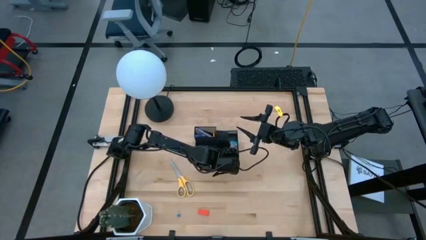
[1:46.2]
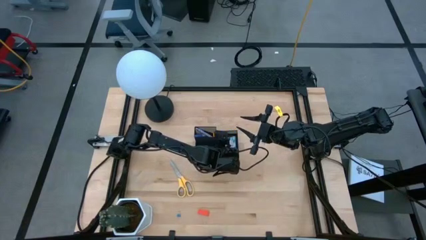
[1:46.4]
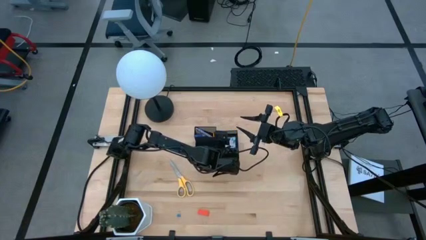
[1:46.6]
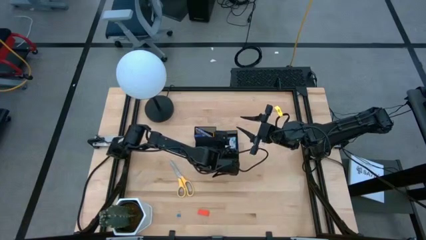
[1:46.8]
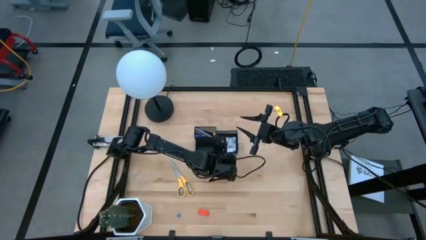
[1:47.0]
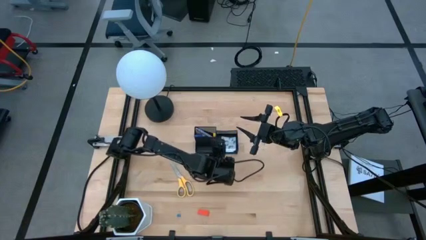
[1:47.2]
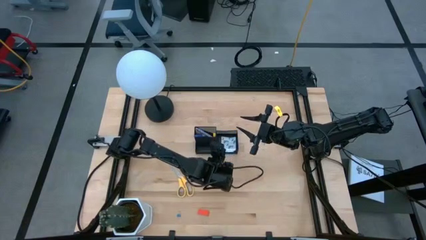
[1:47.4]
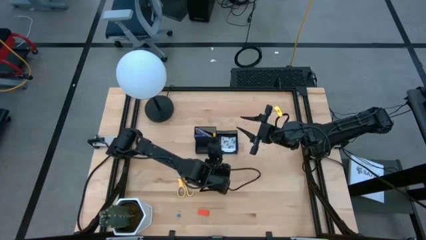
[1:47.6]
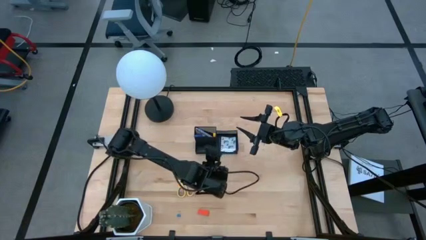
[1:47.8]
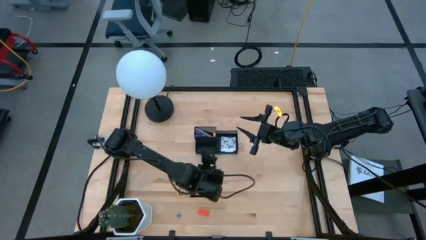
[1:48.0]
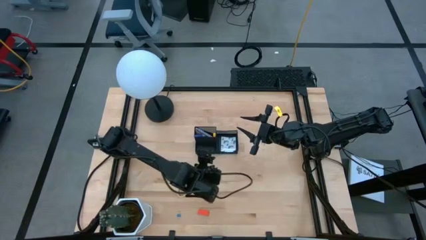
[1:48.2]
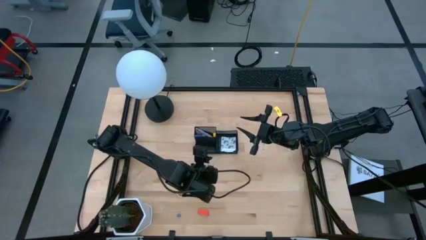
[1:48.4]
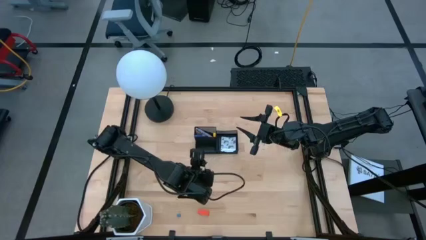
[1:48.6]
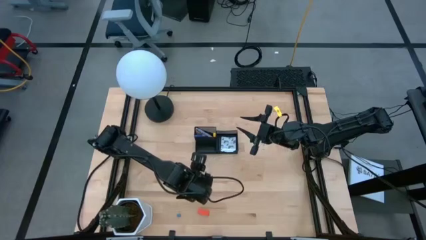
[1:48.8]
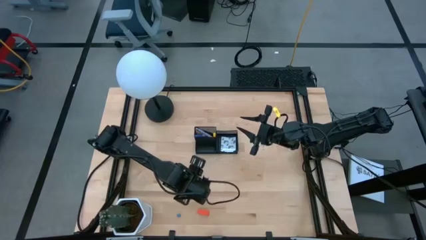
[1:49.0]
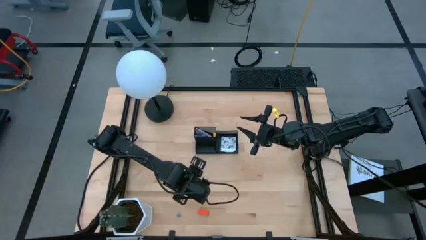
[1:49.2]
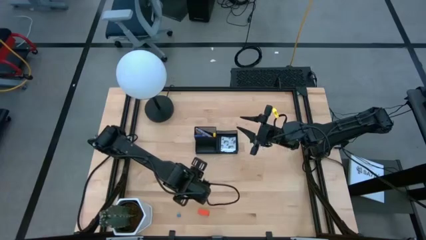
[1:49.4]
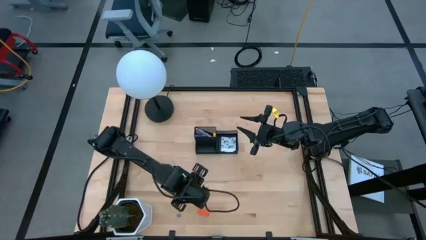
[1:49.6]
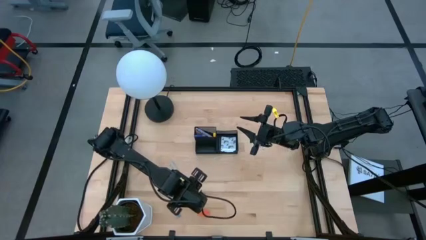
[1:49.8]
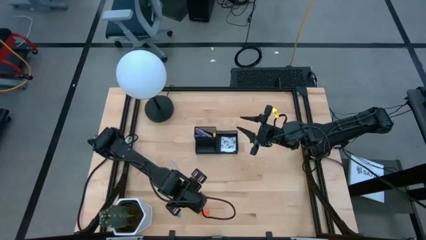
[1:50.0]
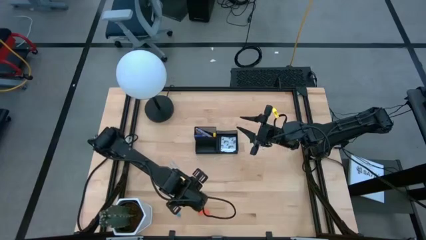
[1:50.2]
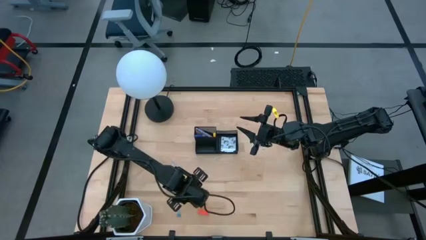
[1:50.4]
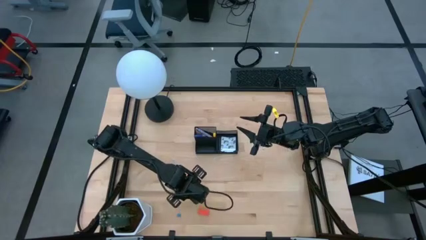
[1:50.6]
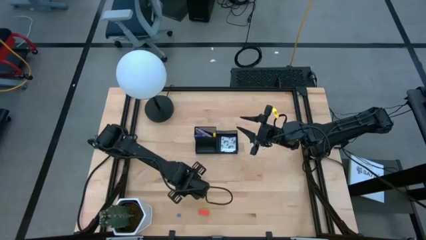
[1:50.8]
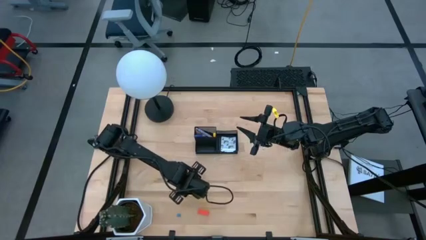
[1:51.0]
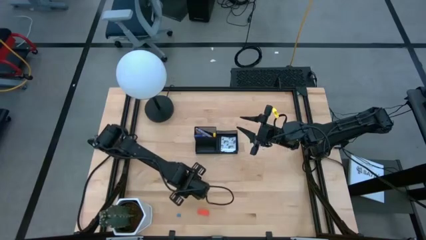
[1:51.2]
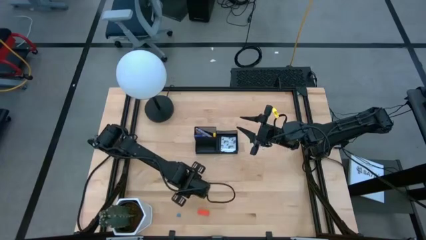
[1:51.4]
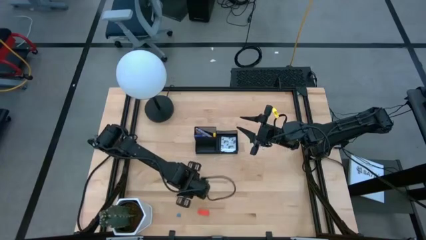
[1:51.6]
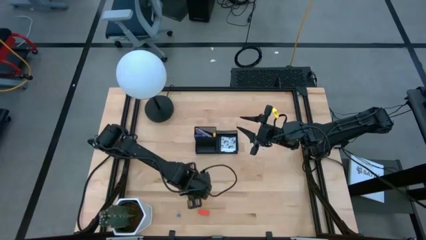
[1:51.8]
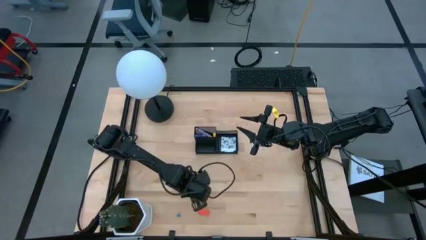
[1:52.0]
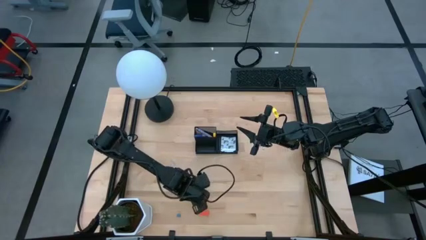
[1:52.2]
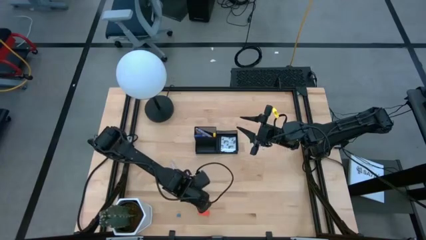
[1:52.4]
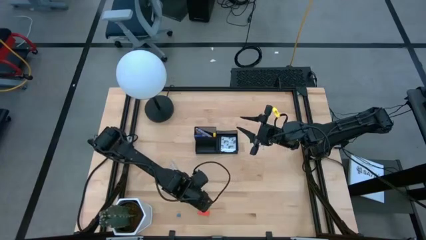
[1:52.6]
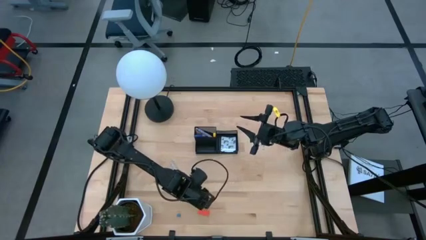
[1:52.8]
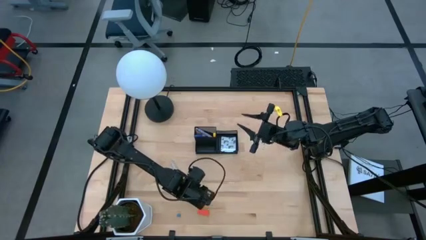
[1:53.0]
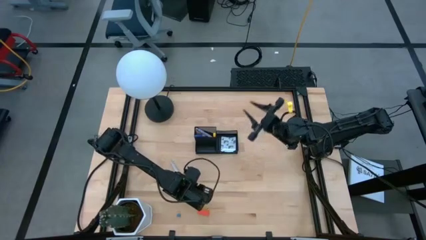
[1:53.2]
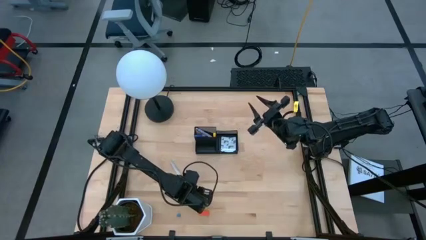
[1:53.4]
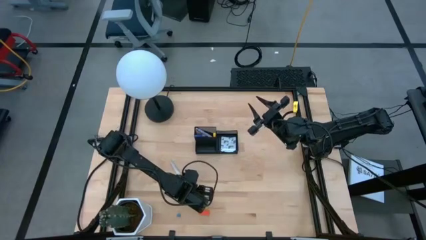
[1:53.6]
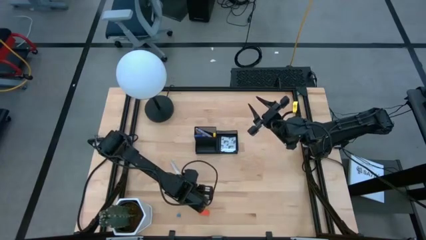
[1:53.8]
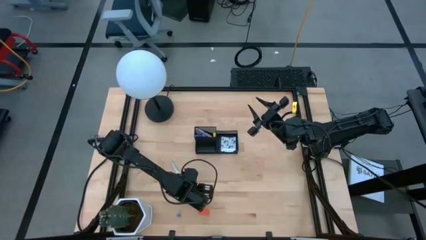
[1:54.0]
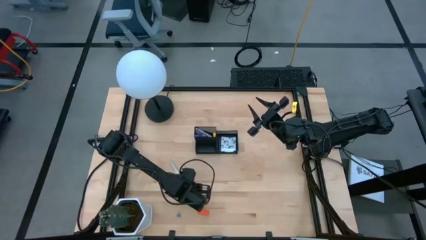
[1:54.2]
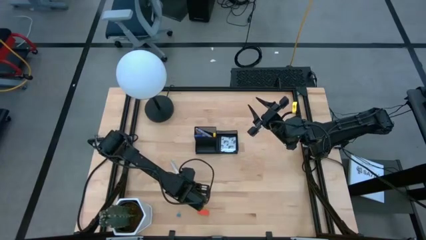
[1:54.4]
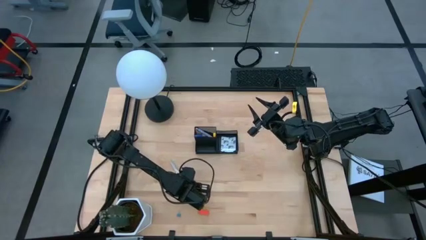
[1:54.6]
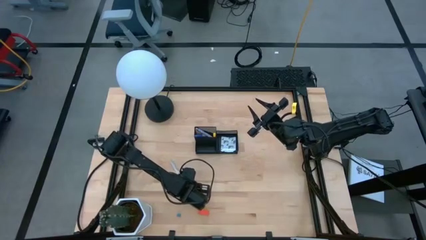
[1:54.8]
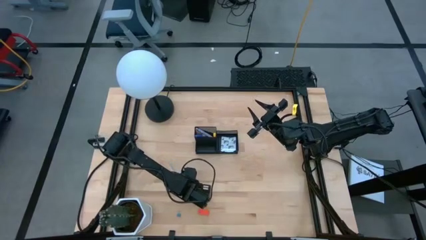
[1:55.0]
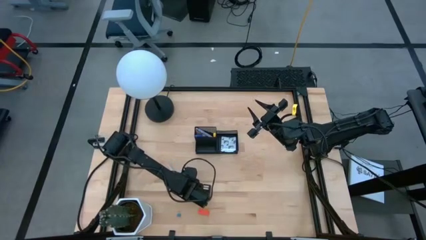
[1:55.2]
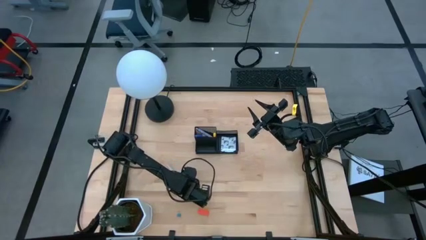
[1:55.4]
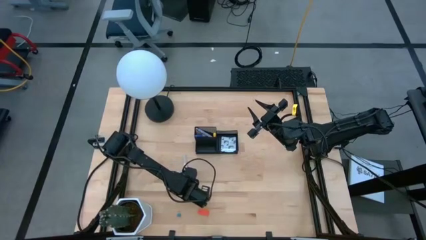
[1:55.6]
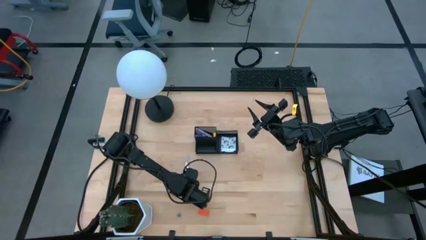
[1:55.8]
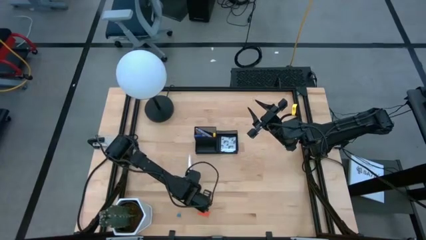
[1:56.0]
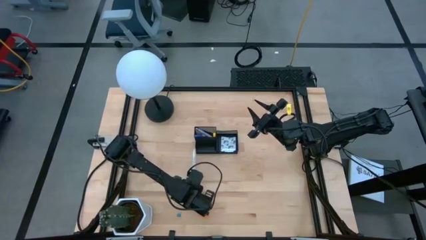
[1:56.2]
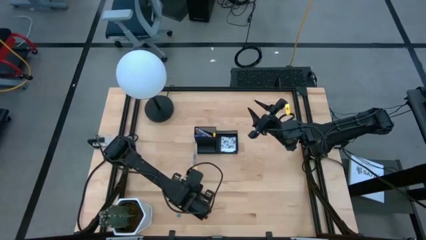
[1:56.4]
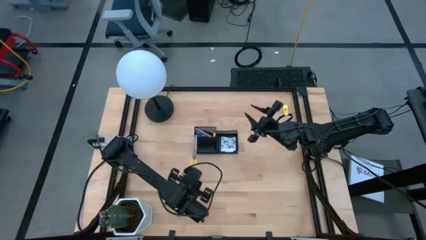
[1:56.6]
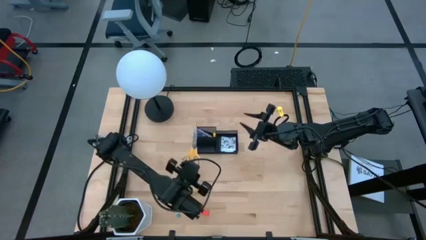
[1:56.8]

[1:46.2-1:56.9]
Task: Pick and place office supplies into organizer
Put the yellow scissors into the desk organizer

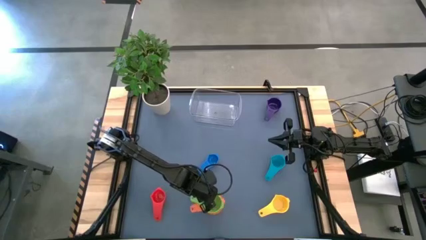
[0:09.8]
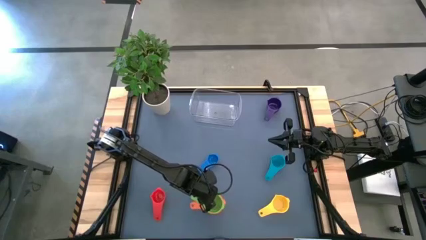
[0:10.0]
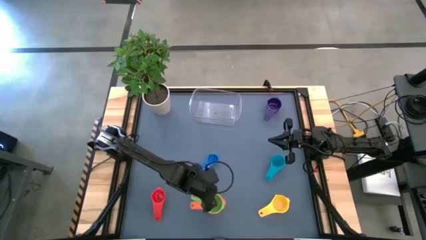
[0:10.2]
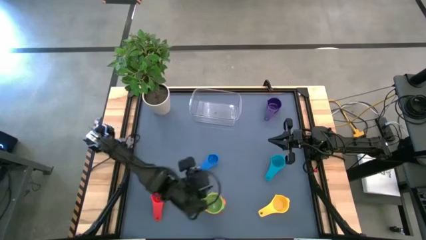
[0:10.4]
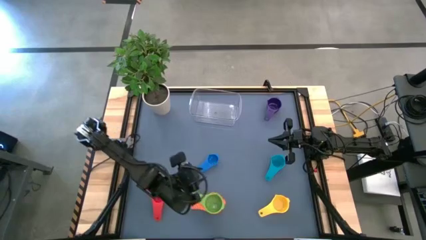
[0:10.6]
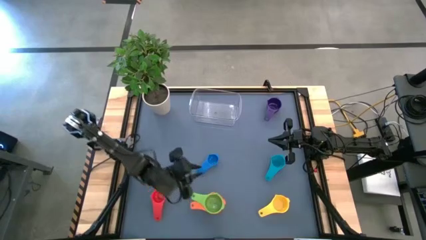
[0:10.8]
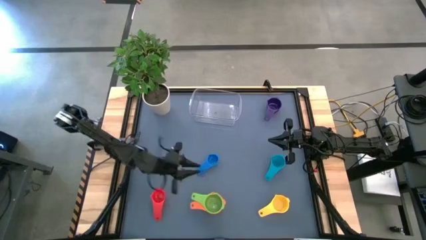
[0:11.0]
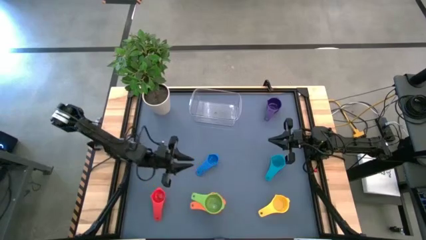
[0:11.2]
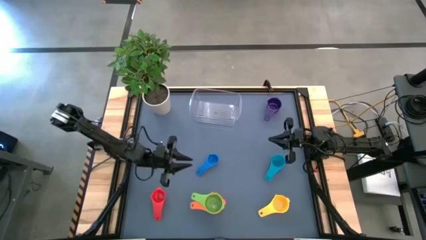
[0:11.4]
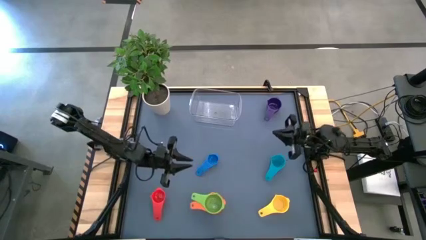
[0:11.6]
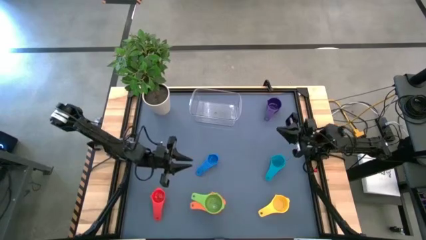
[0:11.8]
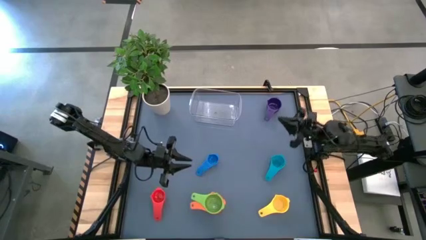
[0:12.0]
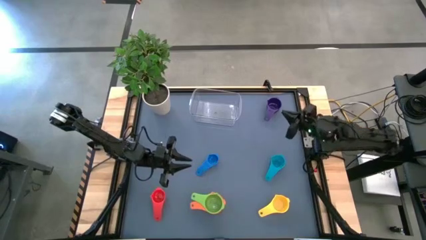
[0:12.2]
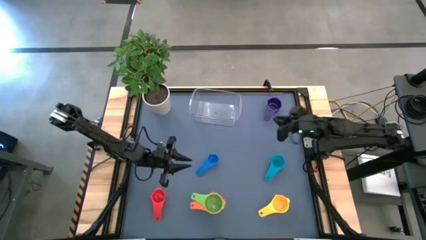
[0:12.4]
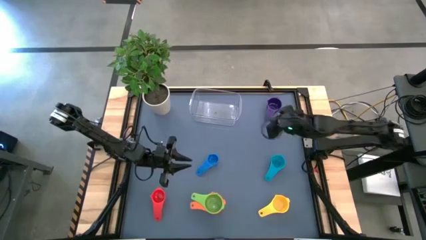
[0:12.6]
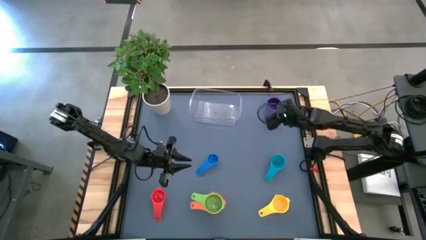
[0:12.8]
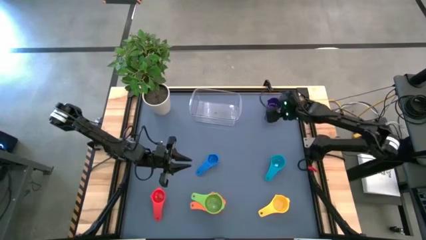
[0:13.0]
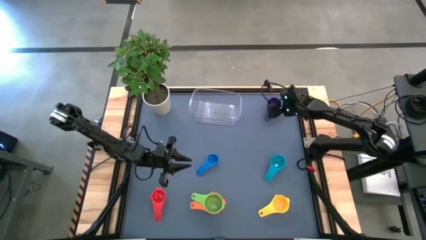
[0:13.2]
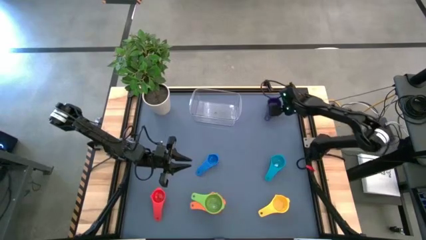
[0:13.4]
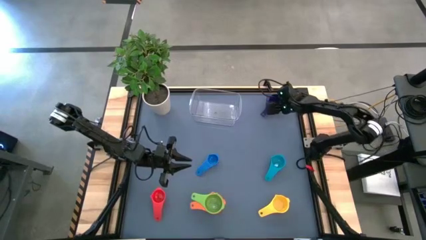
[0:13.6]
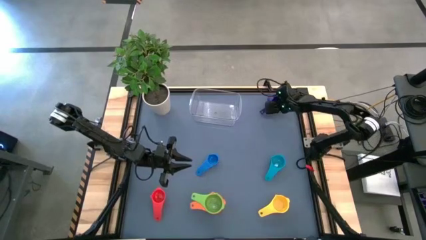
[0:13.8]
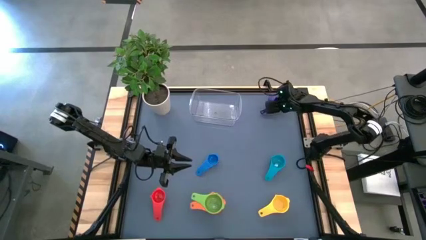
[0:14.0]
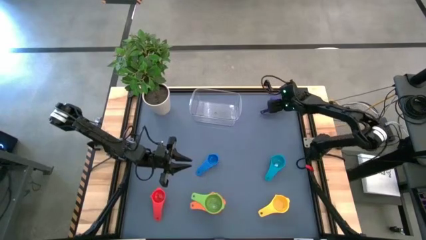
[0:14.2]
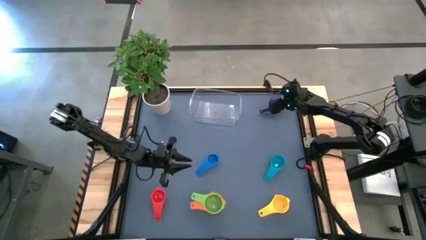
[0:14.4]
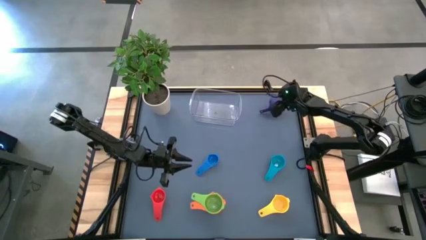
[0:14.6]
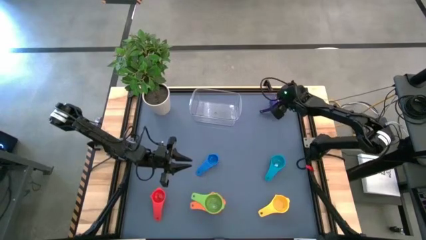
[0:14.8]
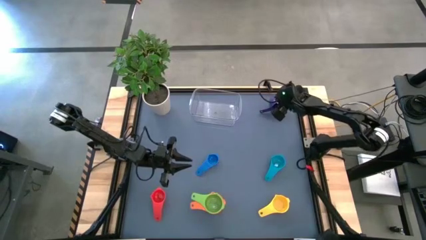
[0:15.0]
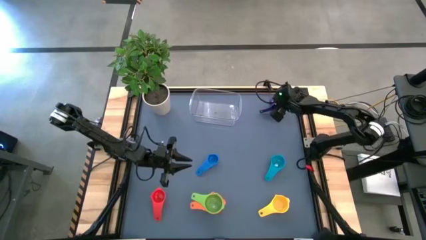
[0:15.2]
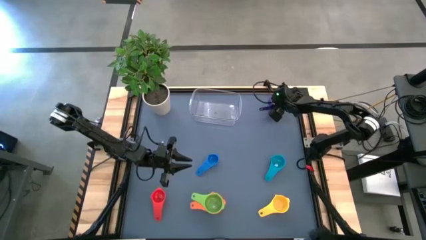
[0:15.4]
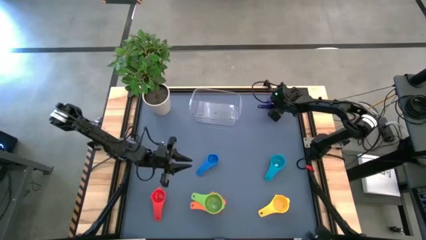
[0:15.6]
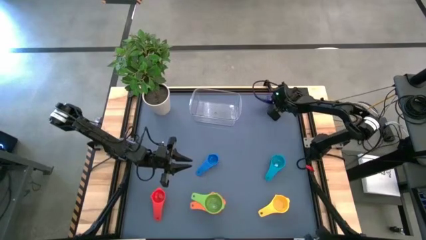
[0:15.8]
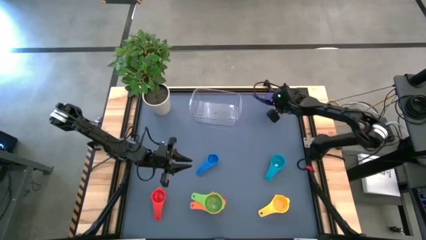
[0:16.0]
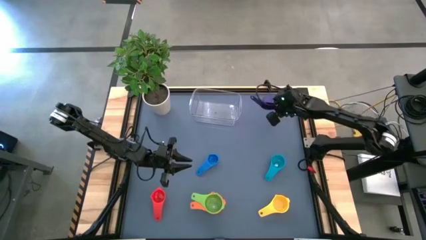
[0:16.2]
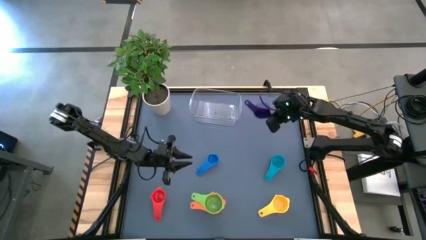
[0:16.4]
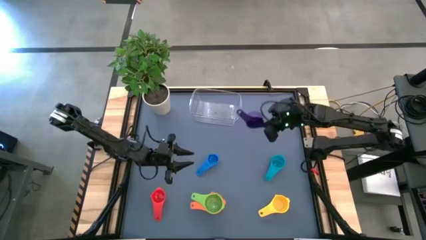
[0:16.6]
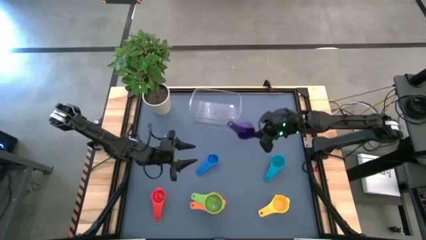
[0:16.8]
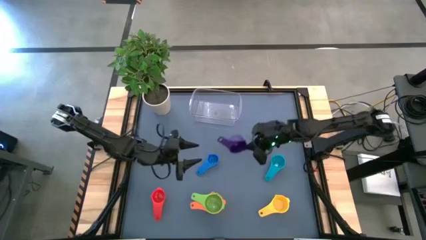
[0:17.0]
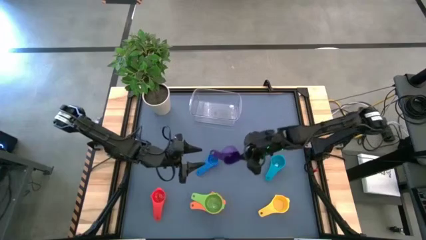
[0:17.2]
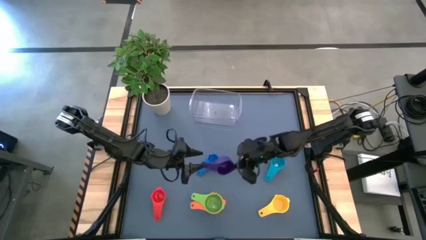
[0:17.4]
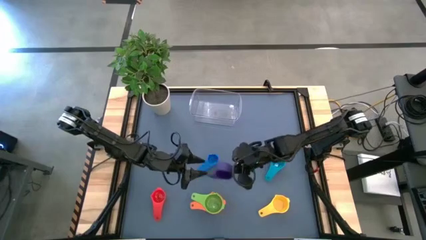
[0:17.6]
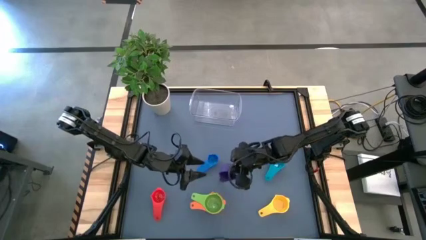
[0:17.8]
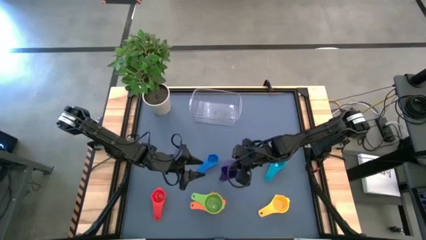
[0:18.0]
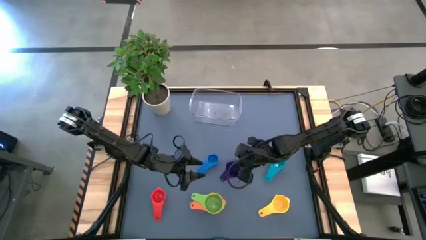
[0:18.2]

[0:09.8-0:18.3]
Task: Nest measuring cups in basket
Stack the purple measuring cup on top of the green measuring cup
